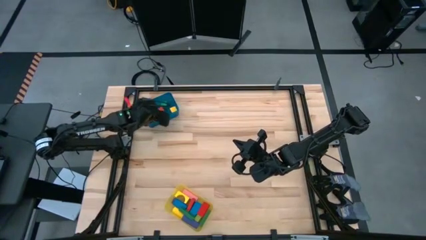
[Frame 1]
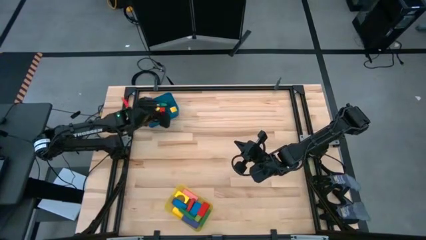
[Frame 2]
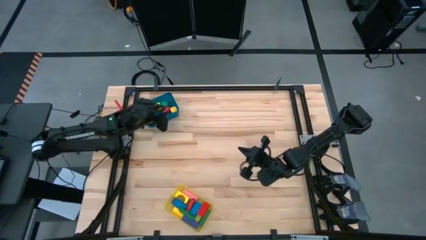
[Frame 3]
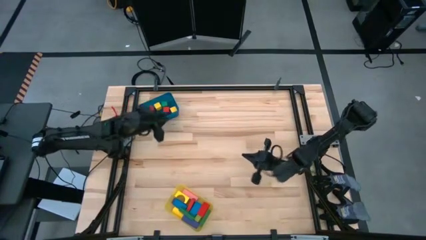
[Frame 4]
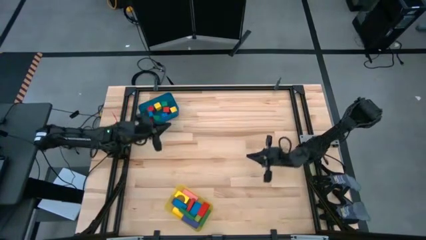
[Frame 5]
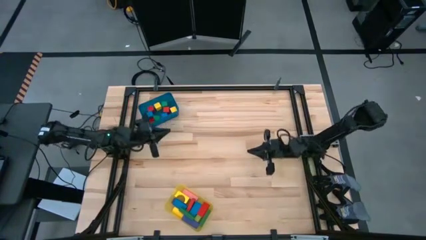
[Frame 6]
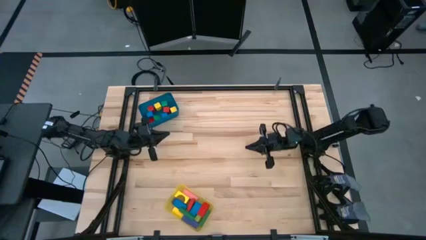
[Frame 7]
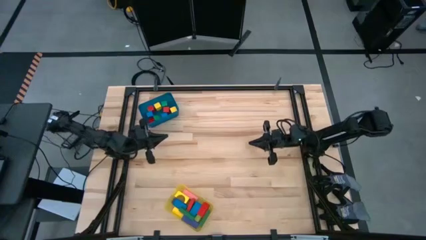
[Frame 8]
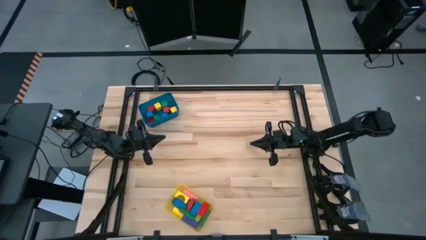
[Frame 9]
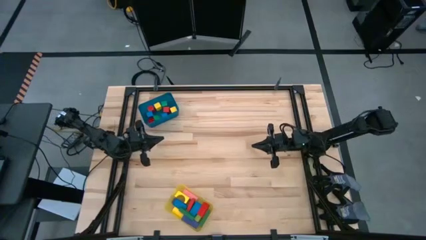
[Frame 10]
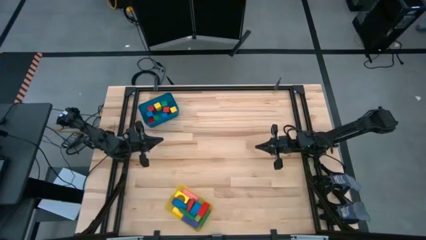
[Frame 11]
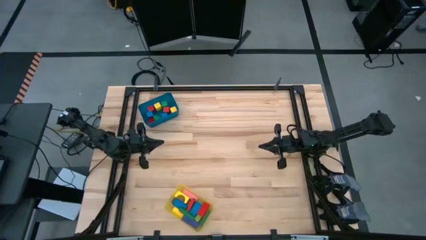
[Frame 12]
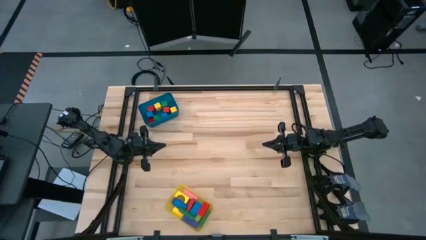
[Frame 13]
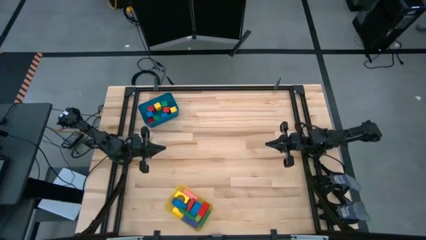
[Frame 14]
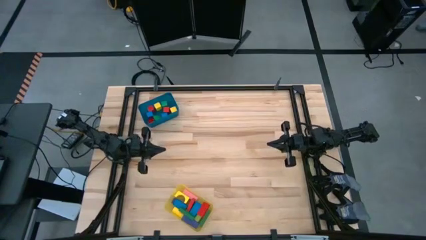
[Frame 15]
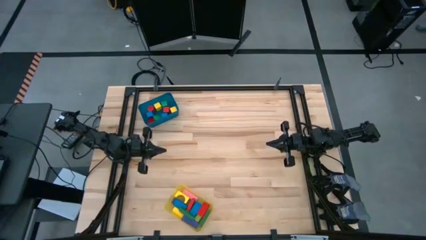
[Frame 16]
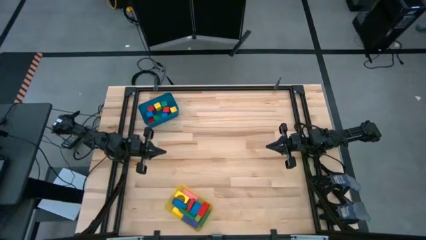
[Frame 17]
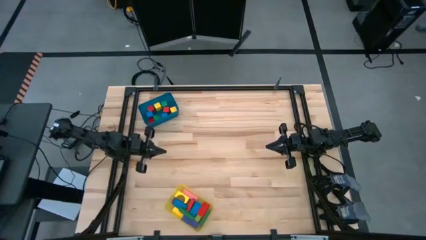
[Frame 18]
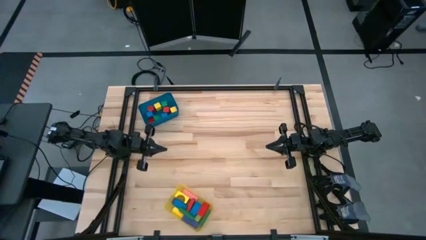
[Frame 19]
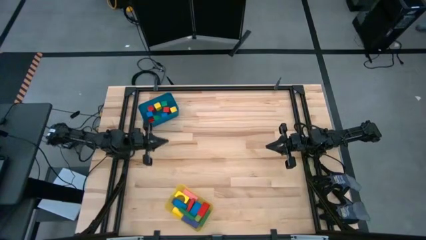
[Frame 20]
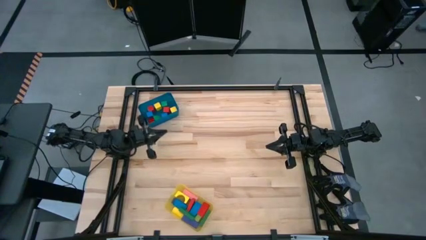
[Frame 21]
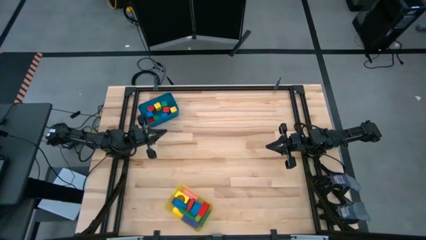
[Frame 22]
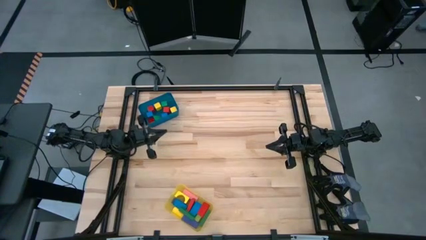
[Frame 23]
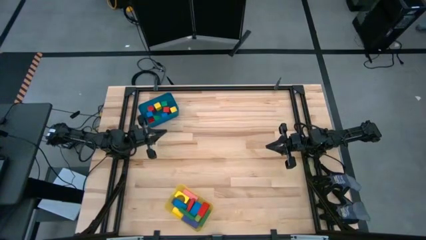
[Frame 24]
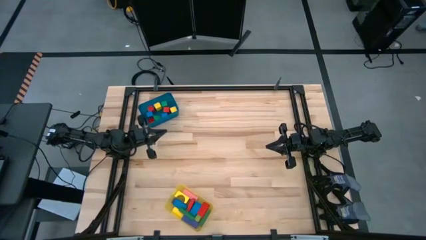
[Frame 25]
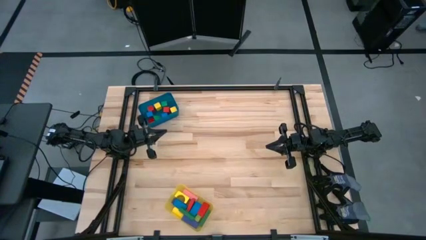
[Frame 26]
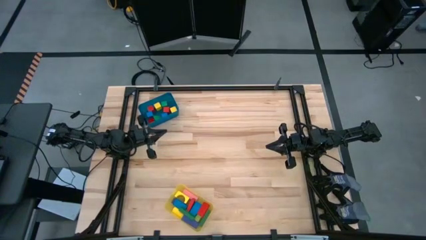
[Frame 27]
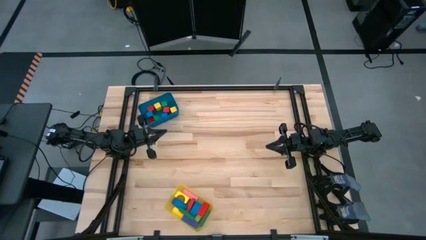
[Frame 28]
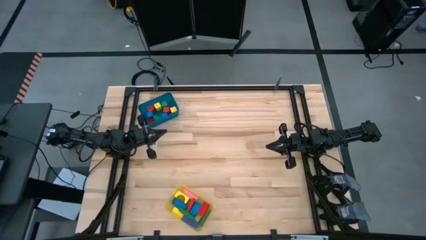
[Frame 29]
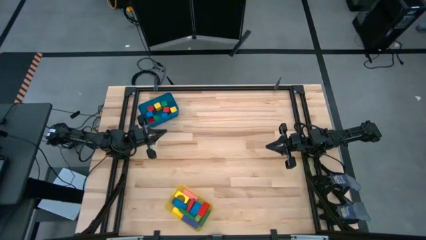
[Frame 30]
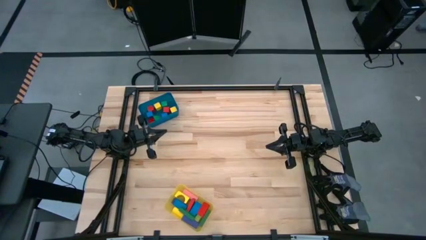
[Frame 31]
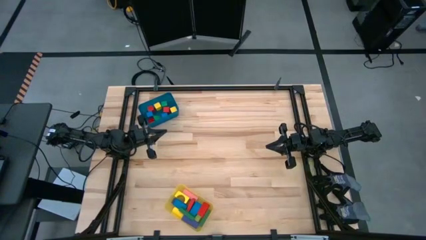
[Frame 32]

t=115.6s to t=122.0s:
Task: Sort blocks by size
Return to Home Position

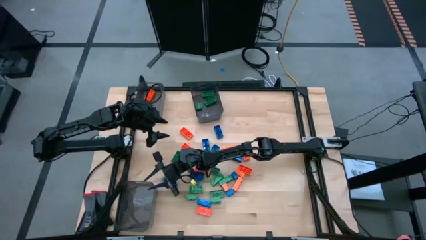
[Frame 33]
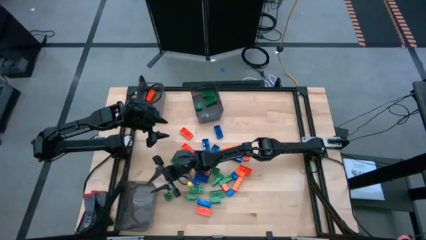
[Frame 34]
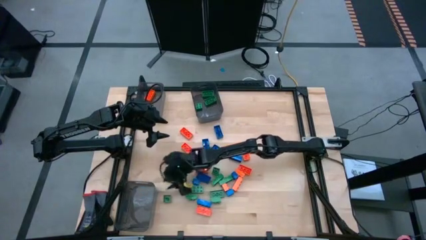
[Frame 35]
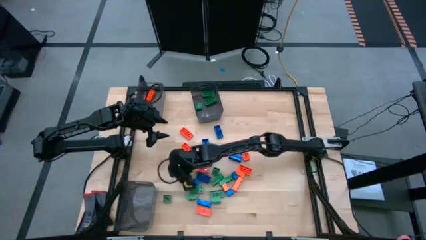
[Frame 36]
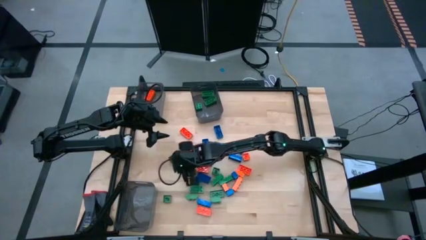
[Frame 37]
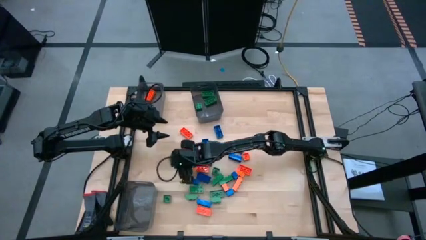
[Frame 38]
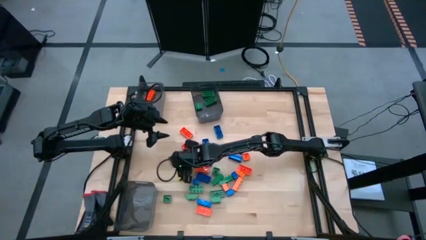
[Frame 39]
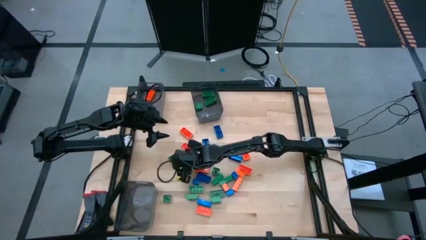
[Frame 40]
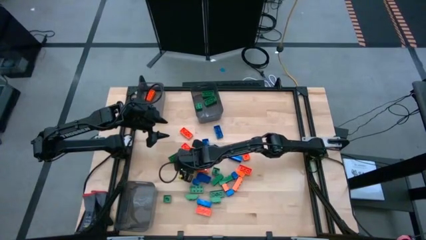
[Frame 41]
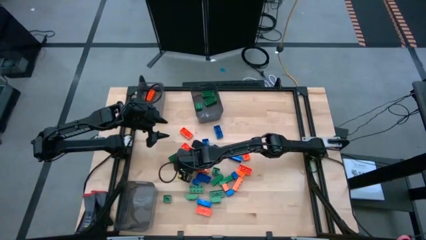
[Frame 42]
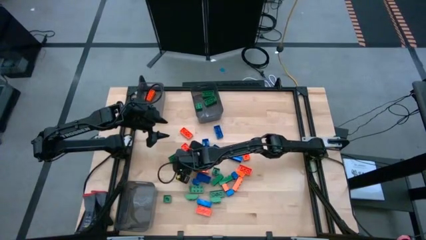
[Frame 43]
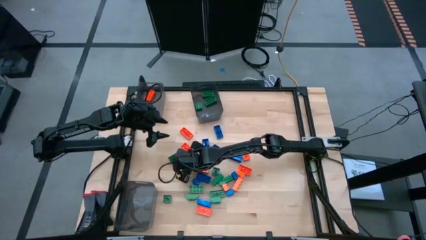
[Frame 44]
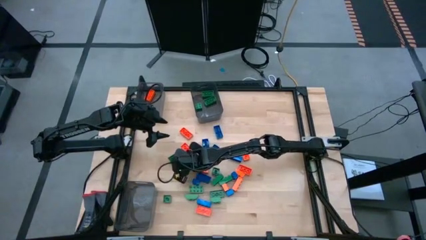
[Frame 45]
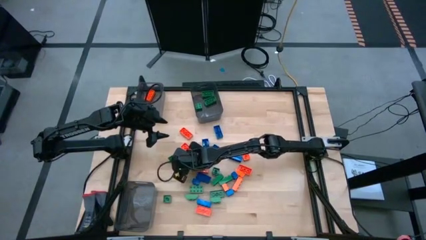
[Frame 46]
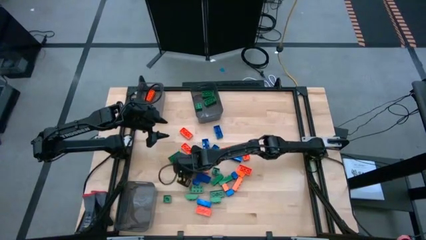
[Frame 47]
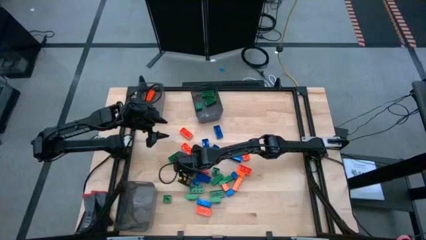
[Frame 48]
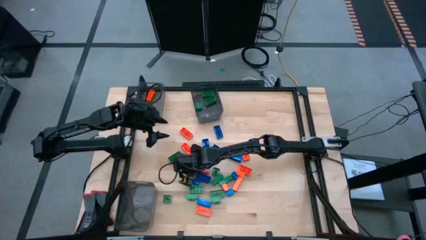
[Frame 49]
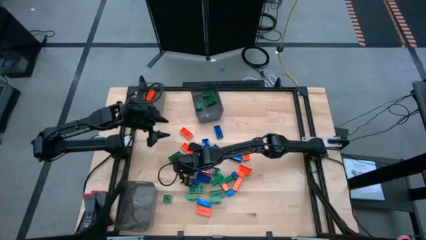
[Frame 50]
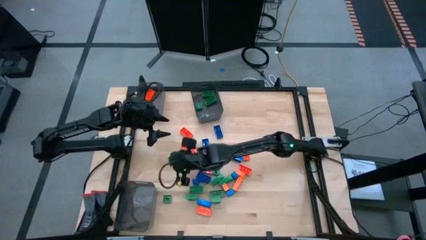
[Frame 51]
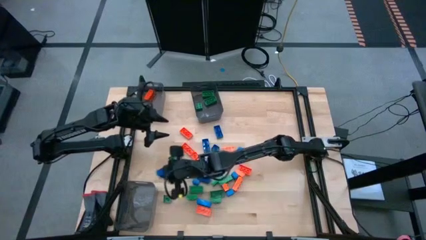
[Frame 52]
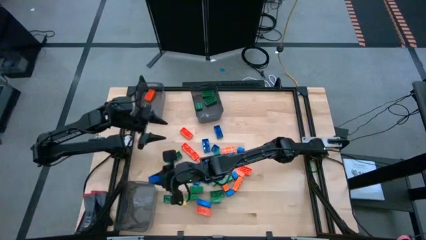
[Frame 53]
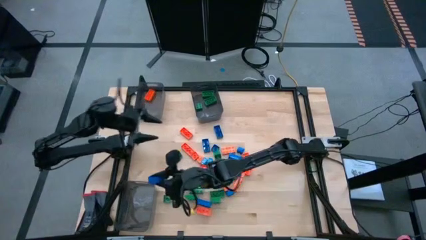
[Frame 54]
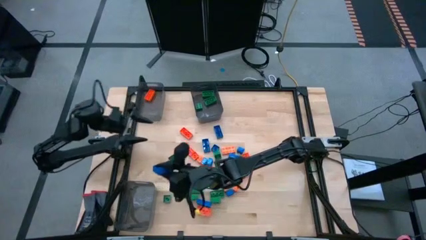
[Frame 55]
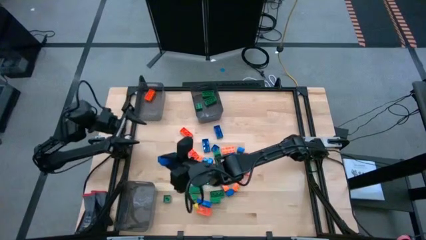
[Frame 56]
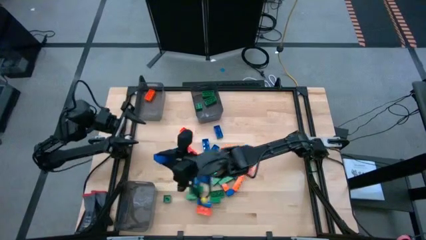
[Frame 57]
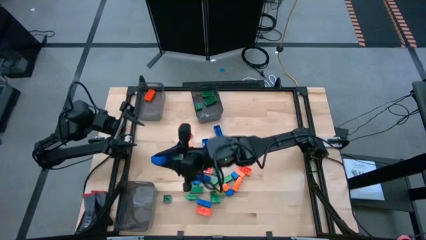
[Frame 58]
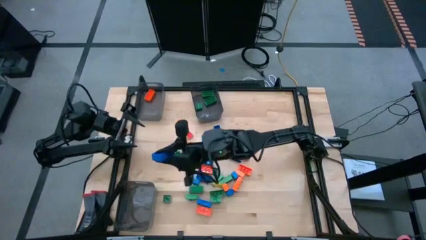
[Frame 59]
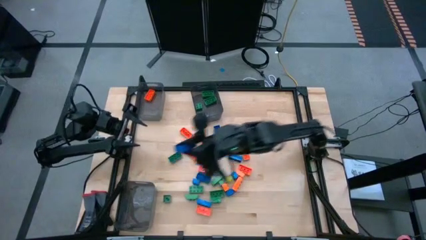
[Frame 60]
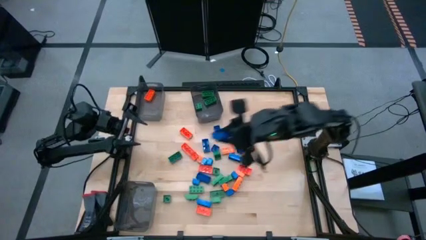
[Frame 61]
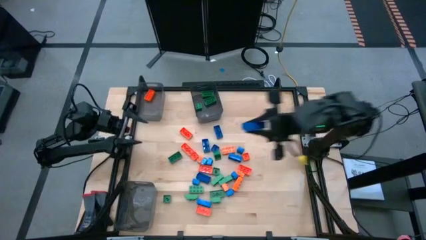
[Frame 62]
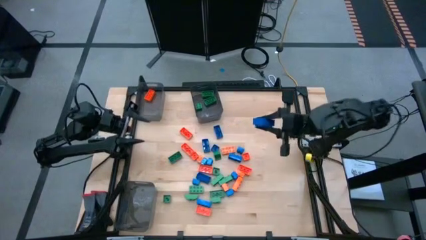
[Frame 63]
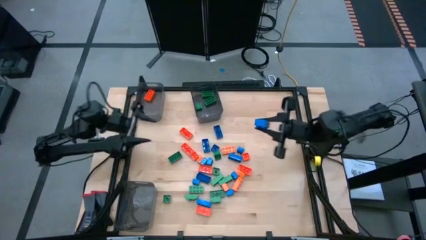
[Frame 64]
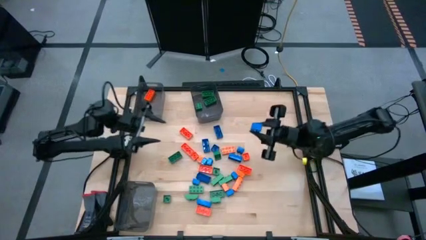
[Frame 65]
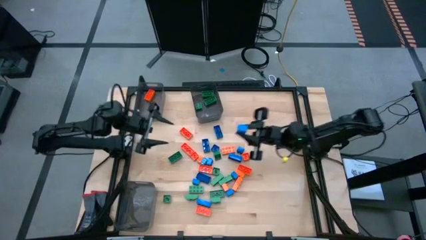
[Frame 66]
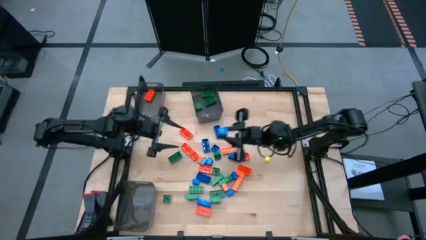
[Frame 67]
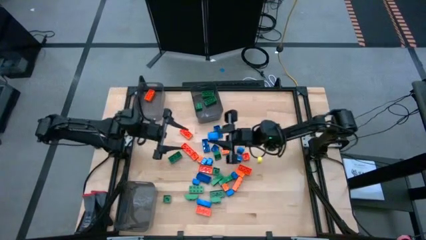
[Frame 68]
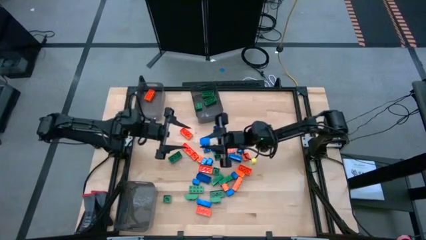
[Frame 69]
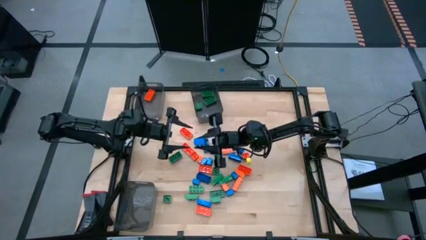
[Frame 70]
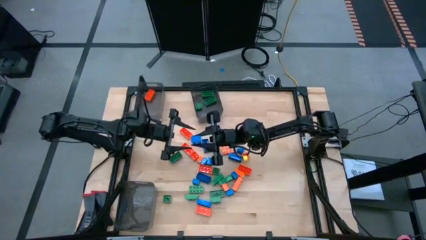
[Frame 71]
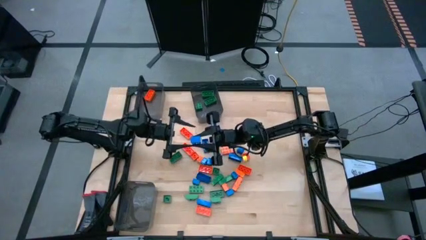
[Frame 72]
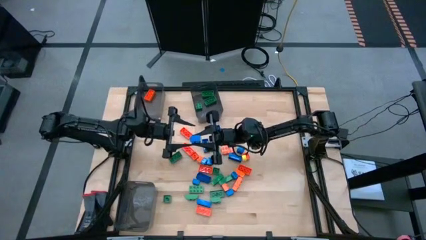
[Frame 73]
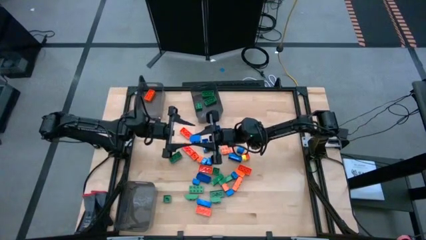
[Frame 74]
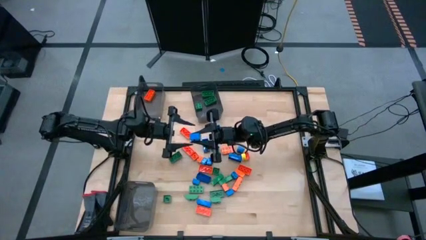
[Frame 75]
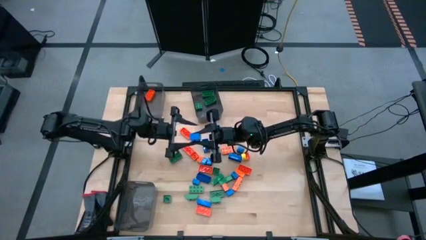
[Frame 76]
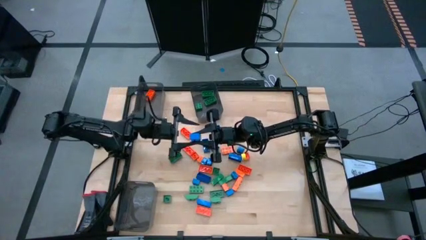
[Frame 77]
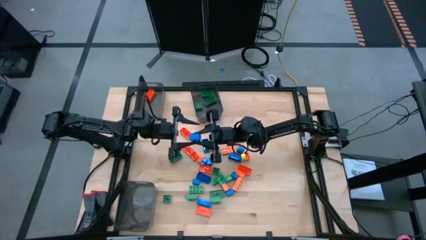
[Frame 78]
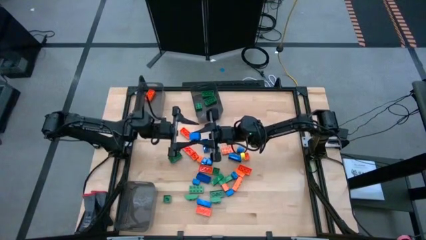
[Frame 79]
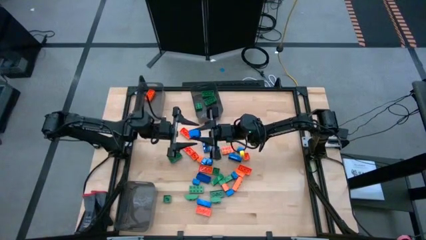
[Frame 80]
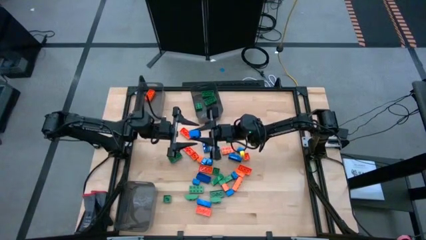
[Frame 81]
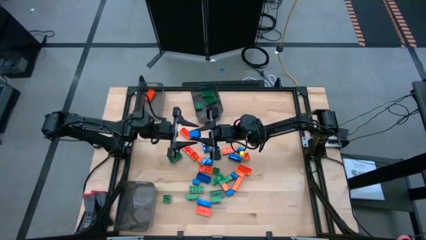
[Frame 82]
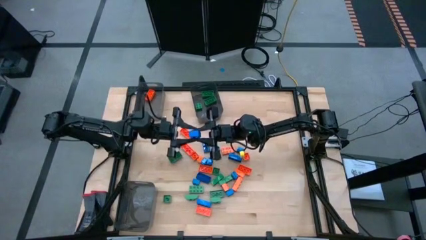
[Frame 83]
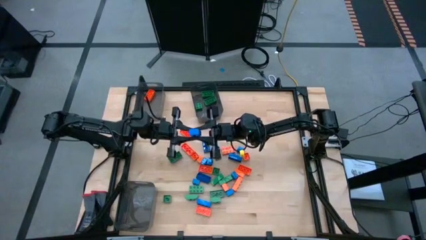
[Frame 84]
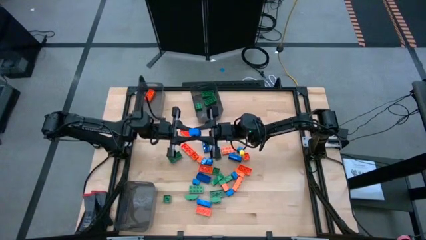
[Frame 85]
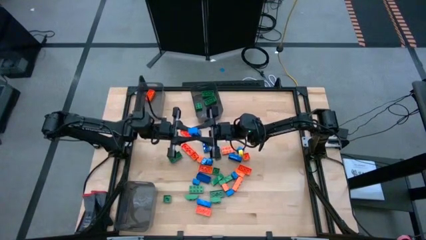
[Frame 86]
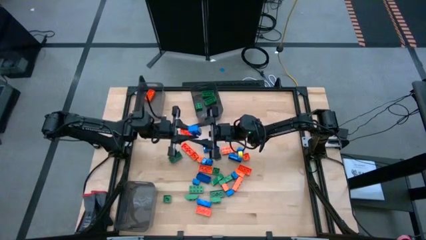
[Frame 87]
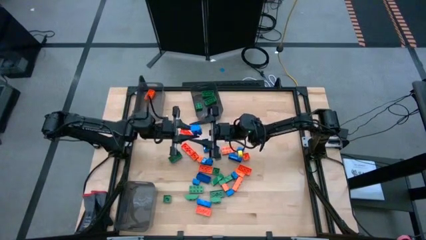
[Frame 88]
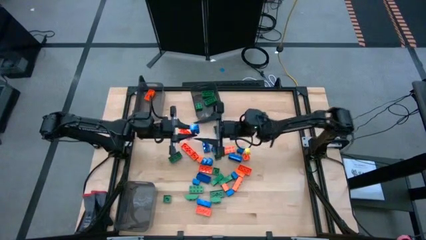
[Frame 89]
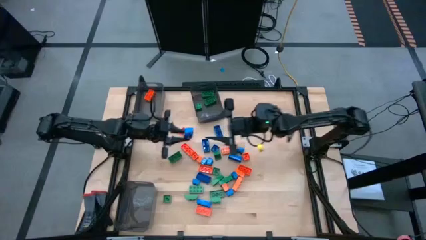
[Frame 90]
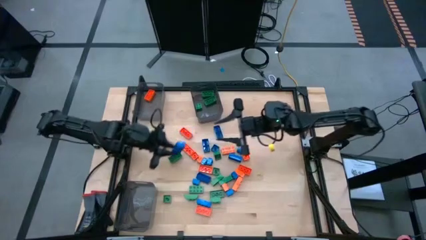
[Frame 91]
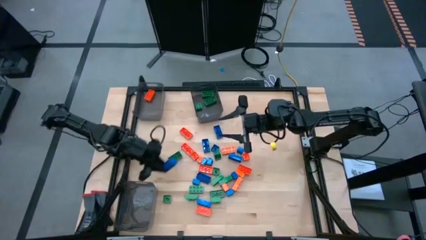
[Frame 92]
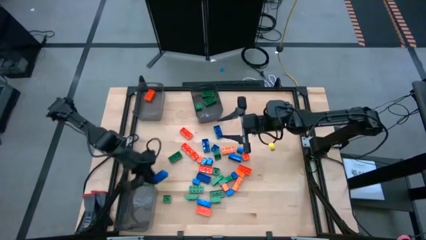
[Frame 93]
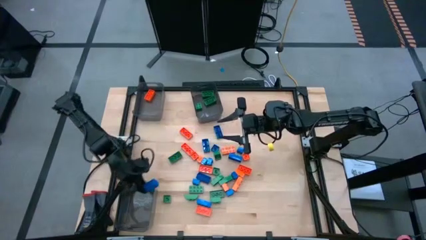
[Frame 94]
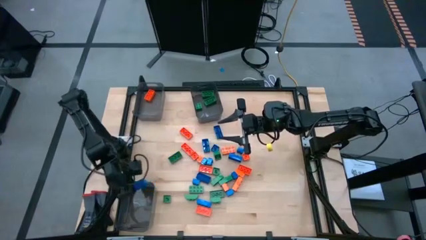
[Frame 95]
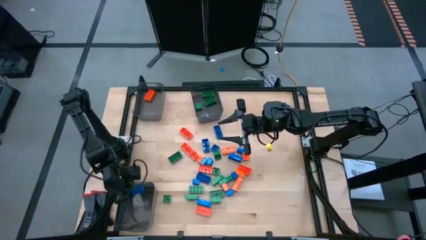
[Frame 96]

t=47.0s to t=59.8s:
Task: Sort blocks
Put the blue game piece into the bottom left black transparent bin
